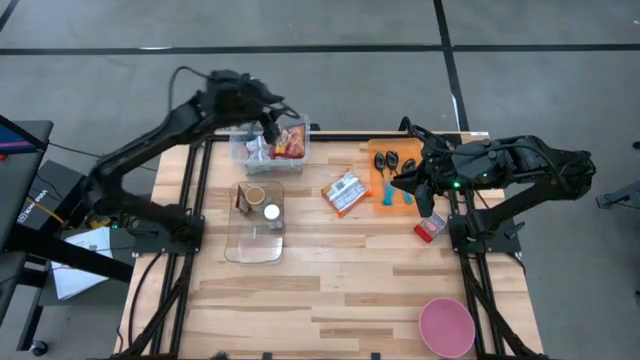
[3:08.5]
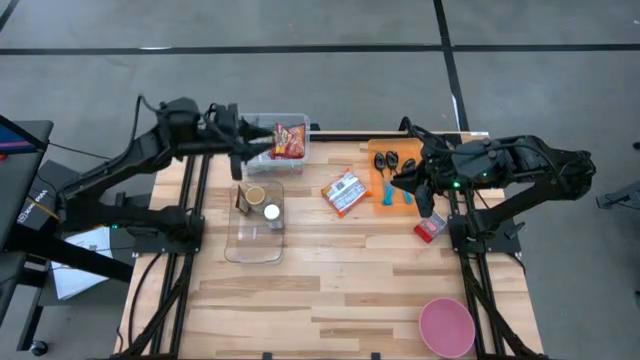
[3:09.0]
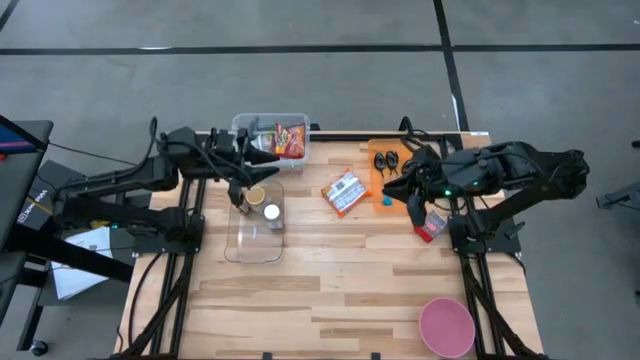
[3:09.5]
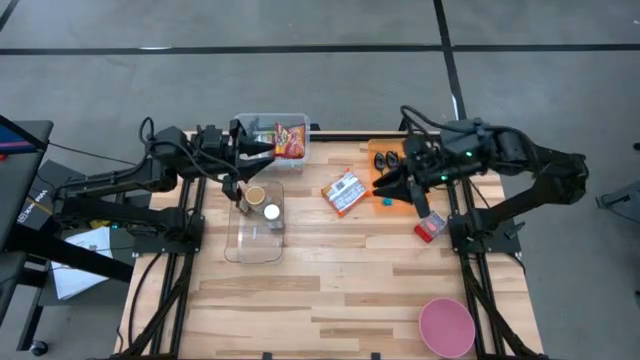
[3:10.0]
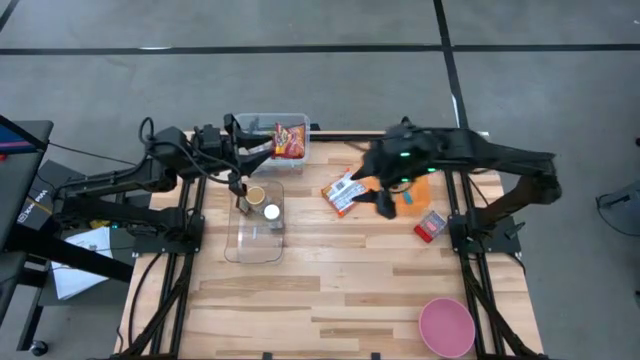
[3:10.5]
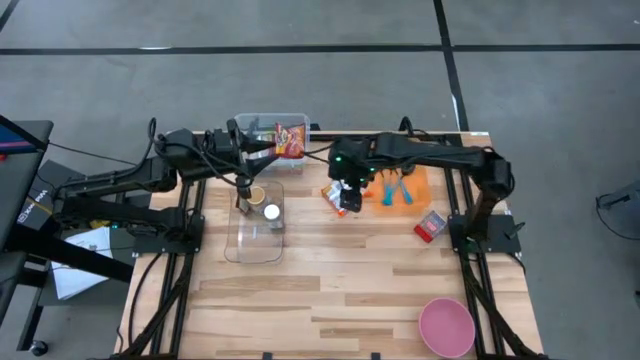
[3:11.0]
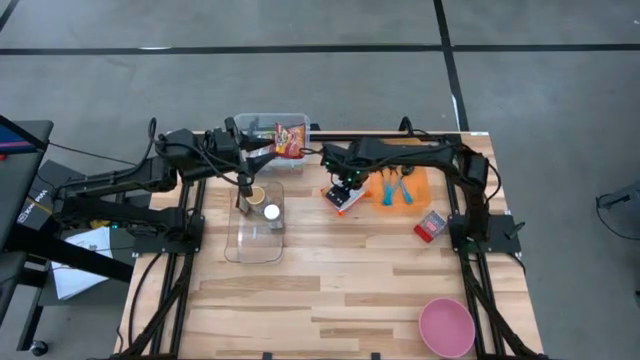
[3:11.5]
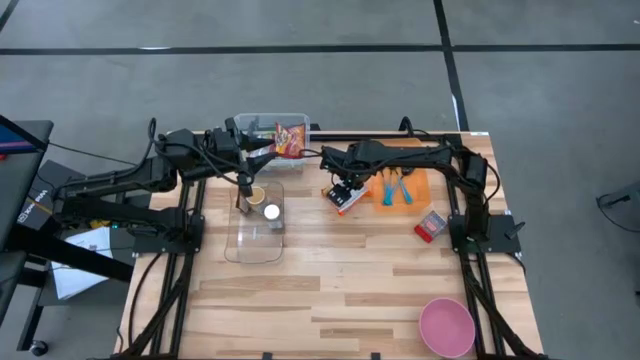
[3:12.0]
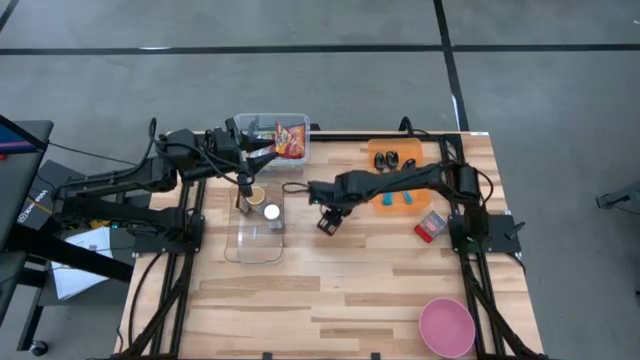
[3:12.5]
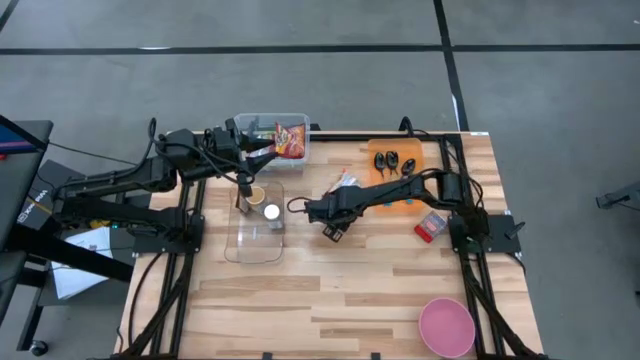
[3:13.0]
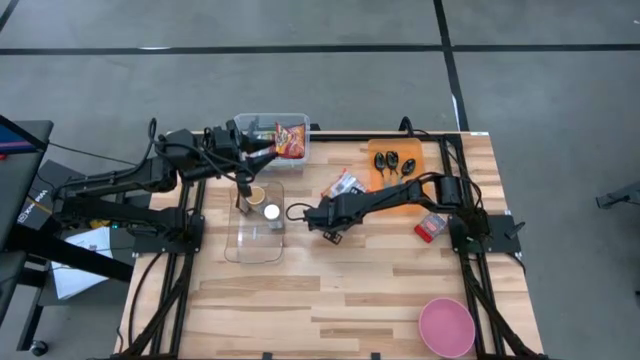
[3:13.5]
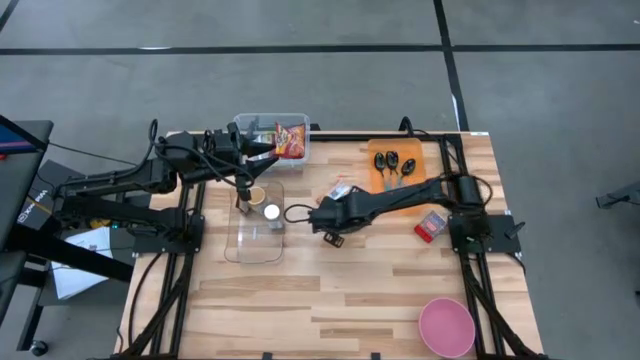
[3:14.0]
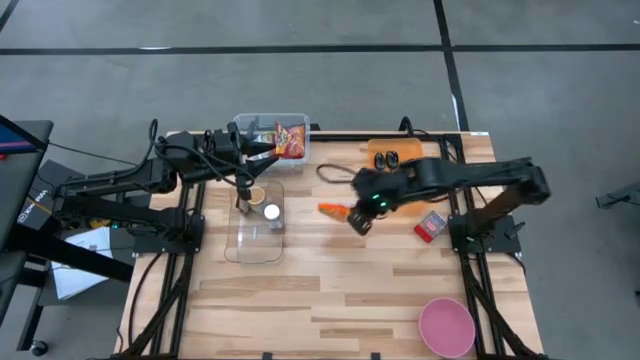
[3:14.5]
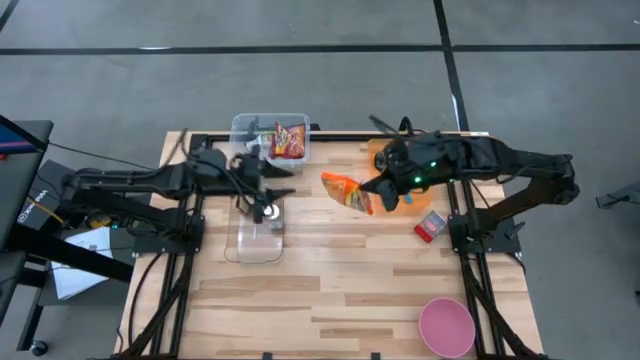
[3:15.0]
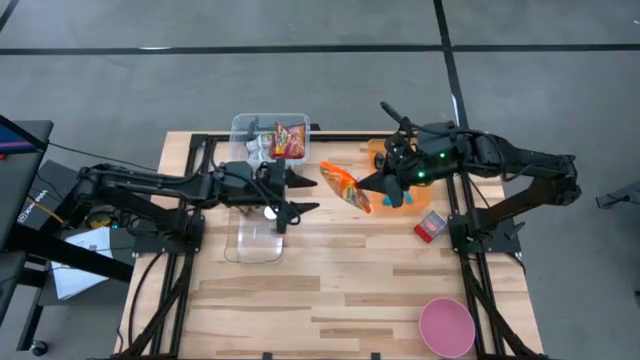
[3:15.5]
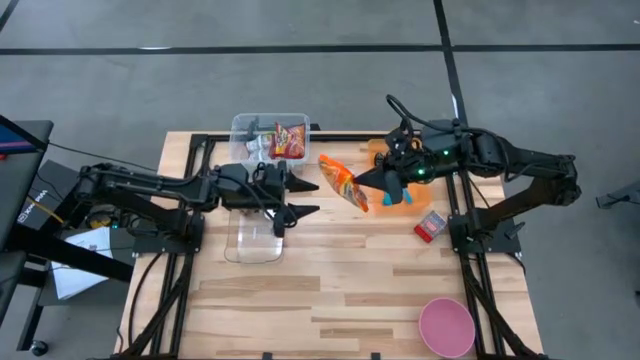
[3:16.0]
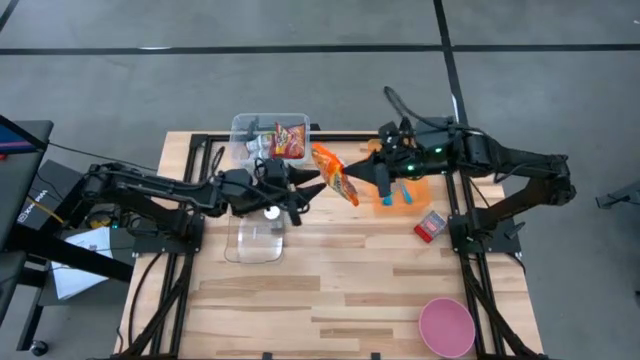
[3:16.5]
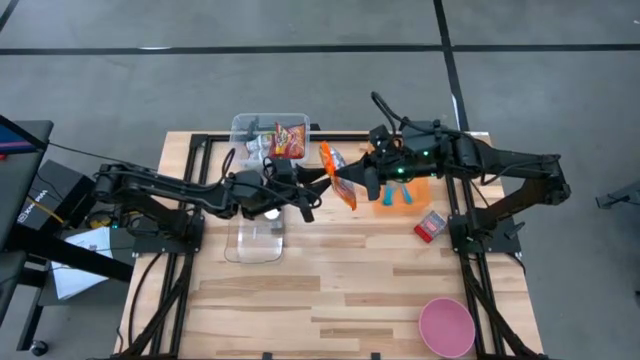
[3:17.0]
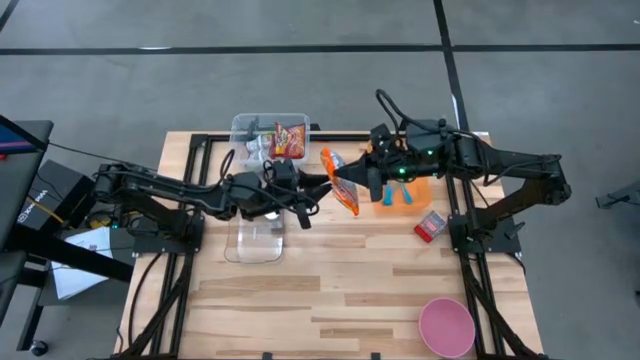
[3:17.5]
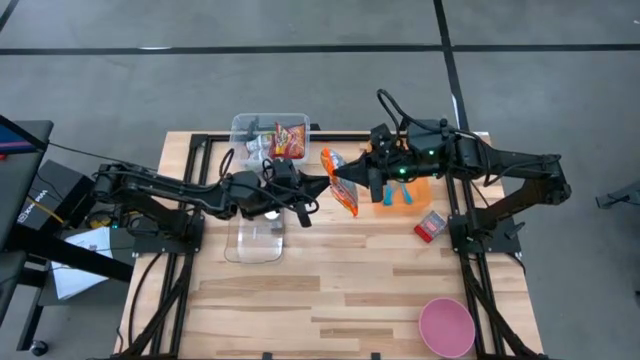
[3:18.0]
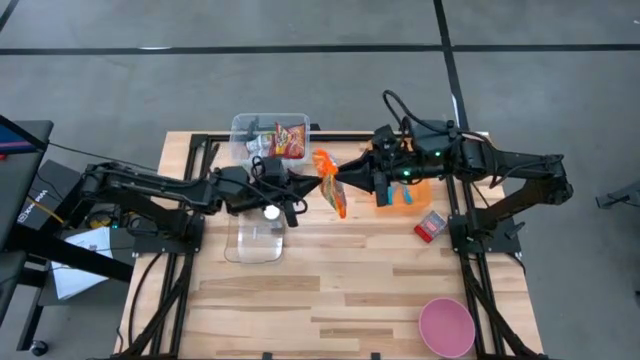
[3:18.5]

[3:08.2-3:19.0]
Task: Pick & Place Food Item
Put the orange noodle pack into the transparent container

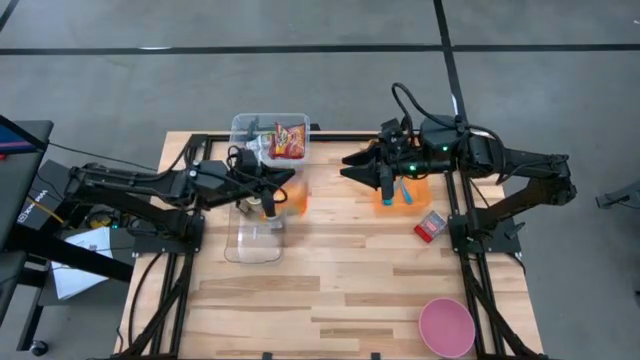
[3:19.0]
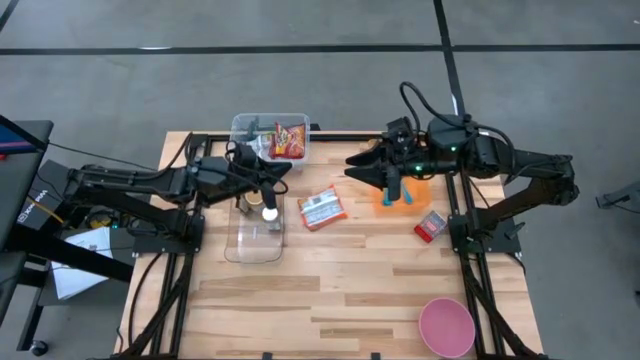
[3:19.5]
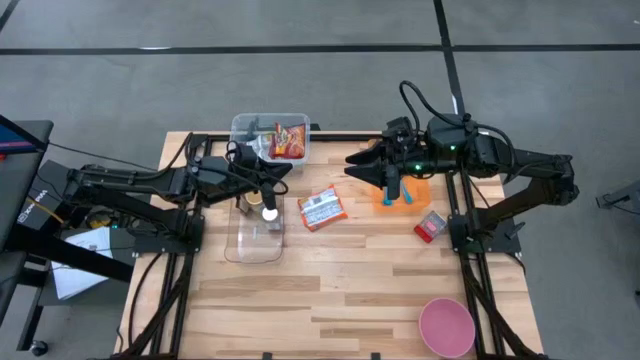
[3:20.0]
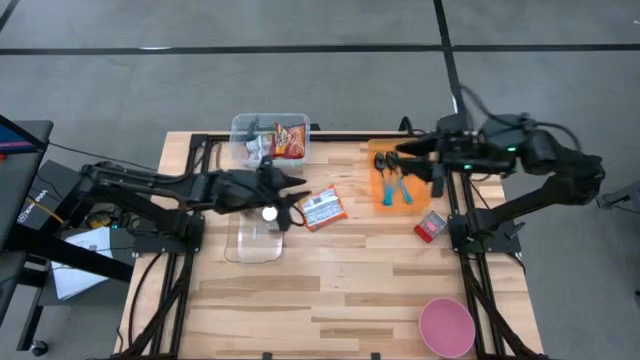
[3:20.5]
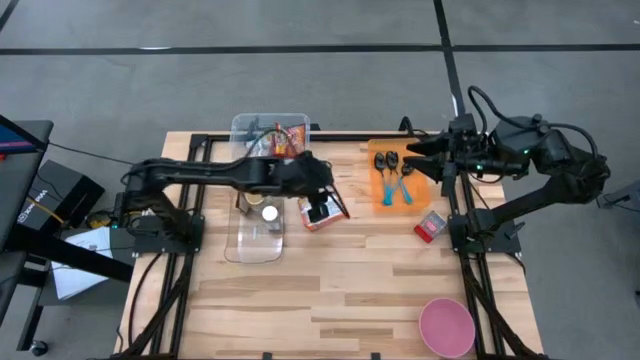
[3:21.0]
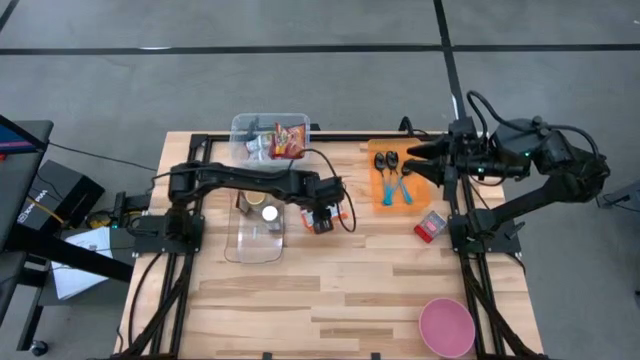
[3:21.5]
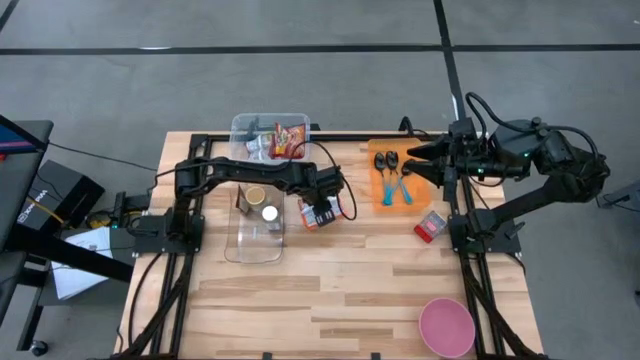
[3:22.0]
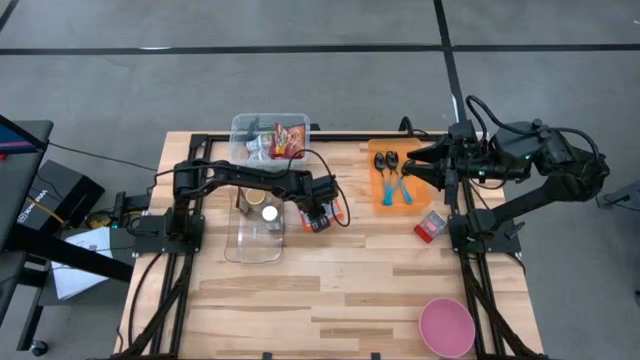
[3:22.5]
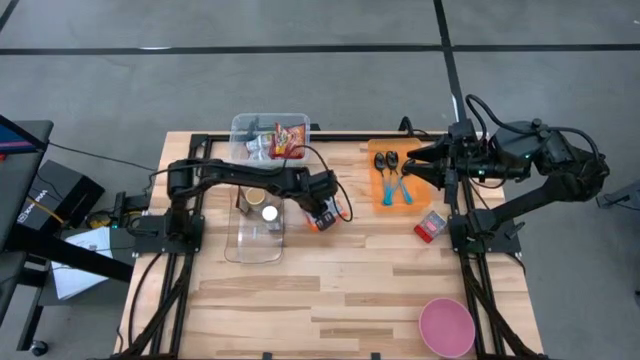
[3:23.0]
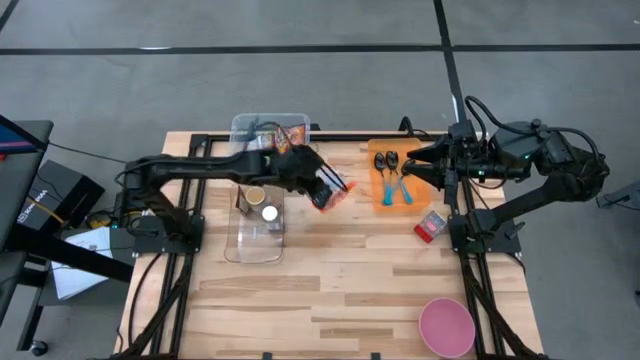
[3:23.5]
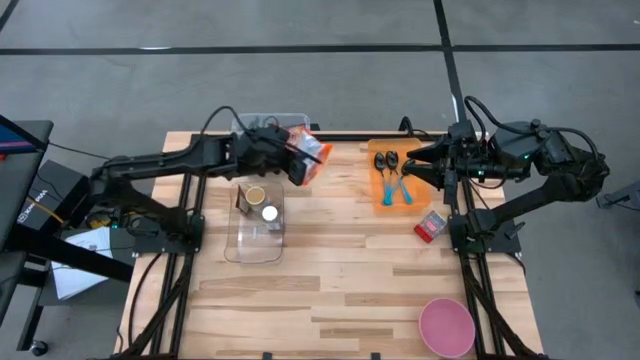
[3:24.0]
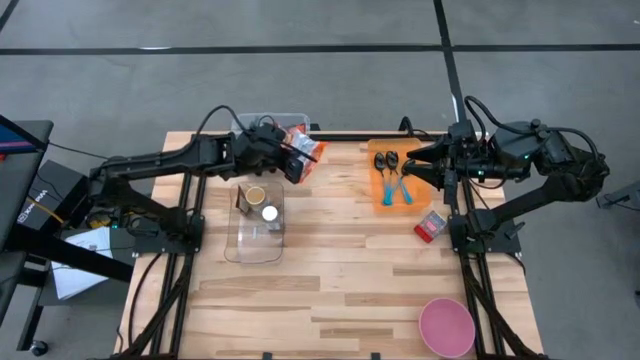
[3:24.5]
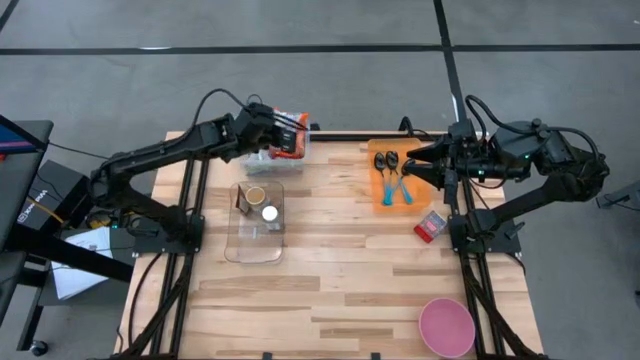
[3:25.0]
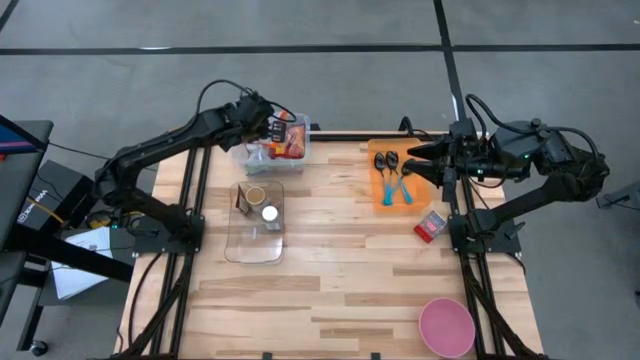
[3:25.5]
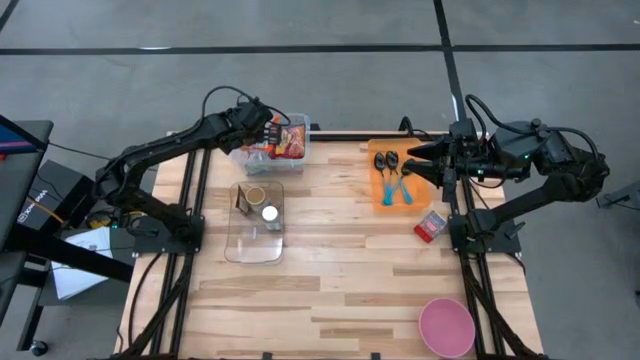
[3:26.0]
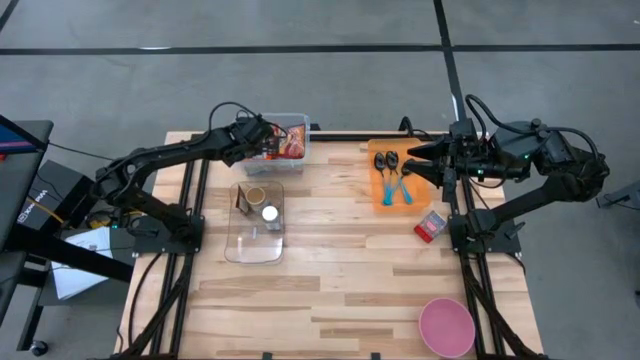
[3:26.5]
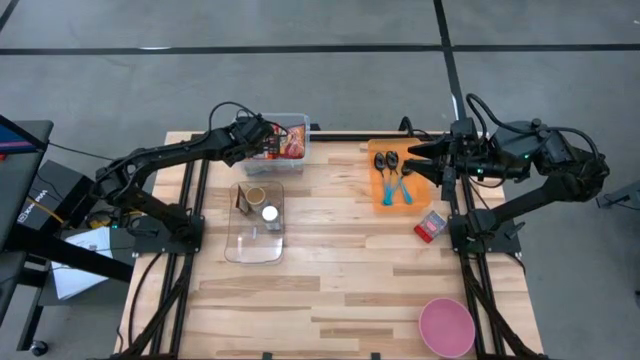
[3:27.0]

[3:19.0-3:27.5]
Put the orange noodle pack into the transparent container

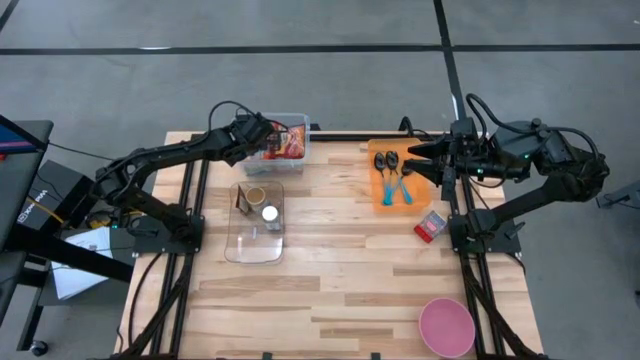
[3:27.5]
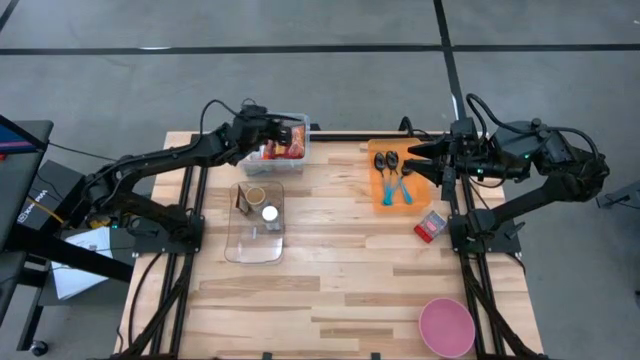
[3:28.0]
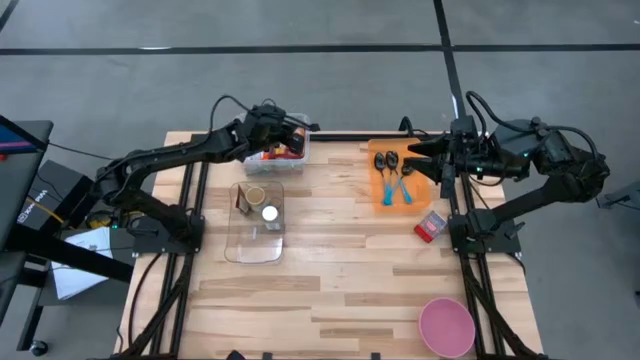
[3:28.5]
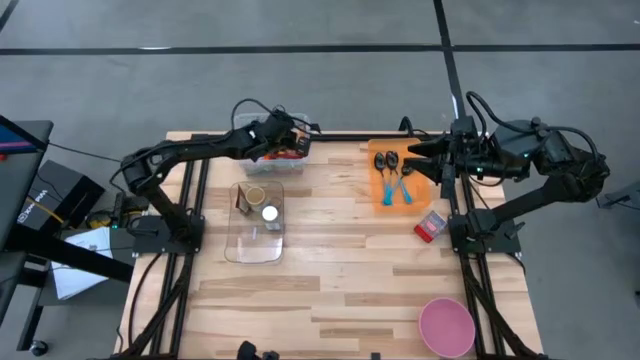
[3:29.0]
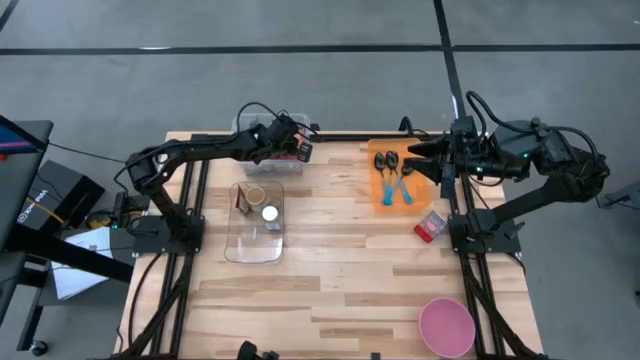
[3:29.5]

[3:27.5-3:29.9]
Adjust the red noodle pack into the transparent container
